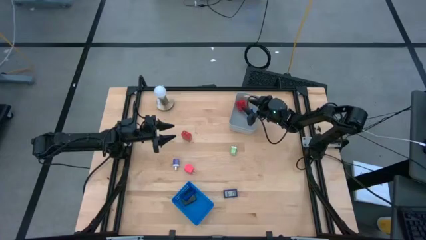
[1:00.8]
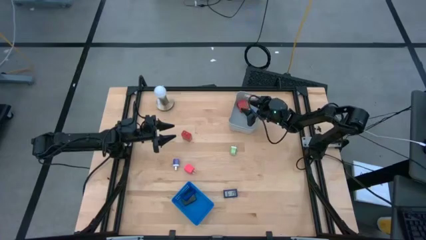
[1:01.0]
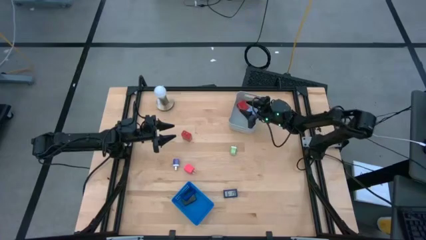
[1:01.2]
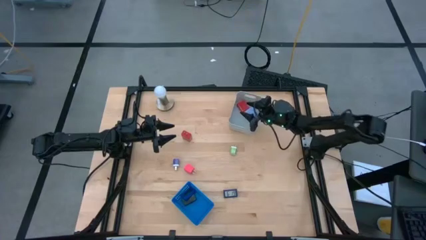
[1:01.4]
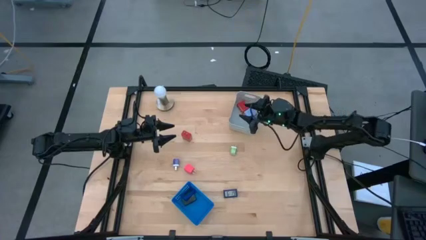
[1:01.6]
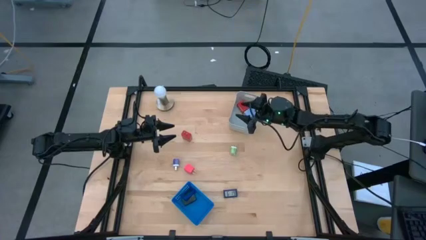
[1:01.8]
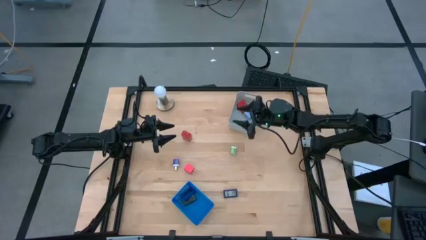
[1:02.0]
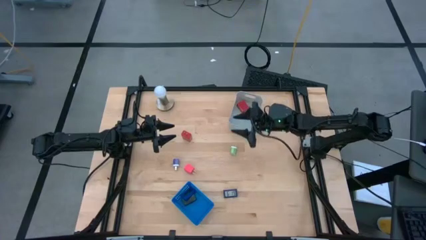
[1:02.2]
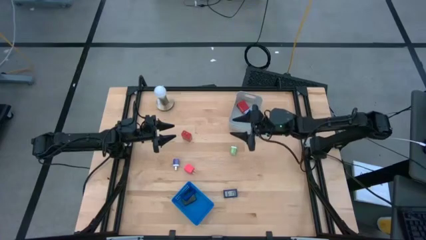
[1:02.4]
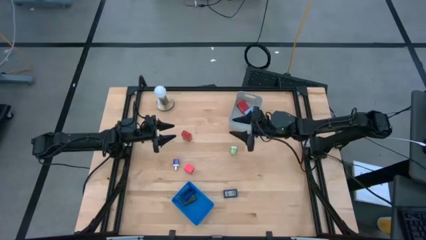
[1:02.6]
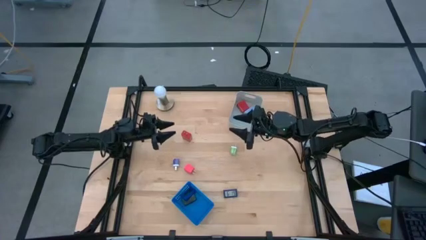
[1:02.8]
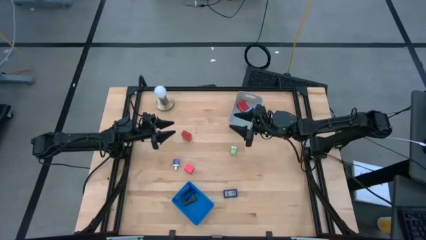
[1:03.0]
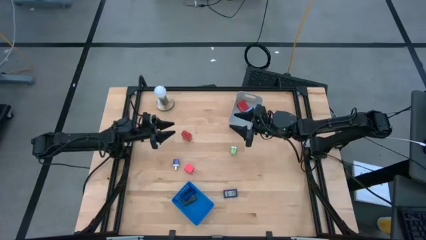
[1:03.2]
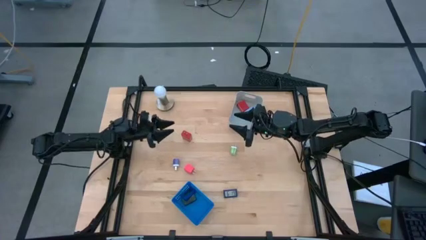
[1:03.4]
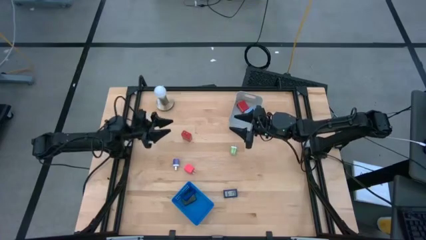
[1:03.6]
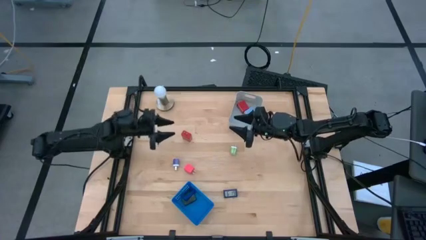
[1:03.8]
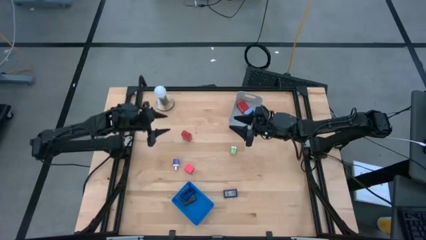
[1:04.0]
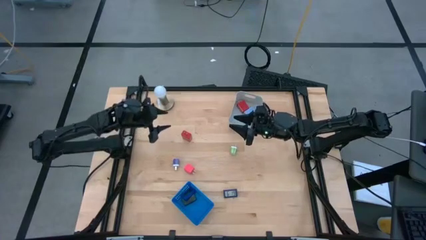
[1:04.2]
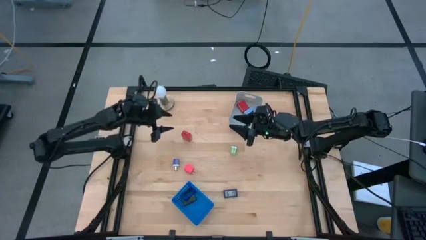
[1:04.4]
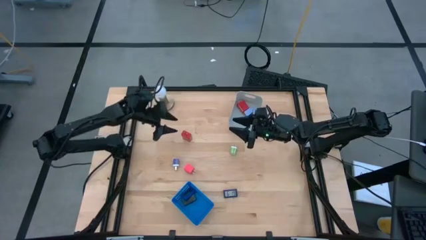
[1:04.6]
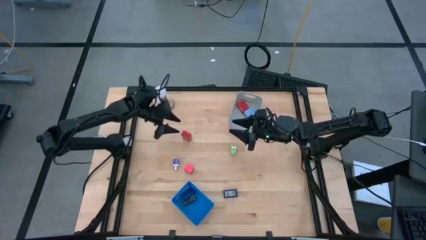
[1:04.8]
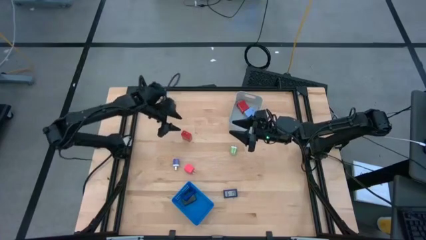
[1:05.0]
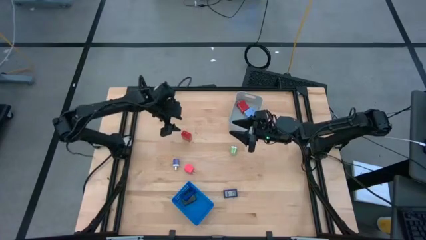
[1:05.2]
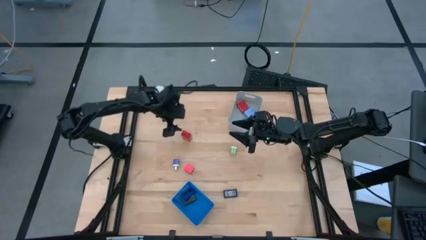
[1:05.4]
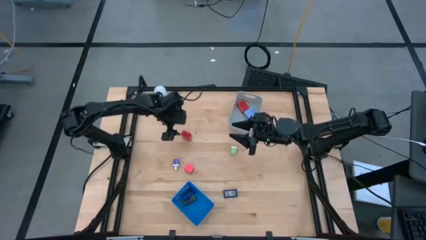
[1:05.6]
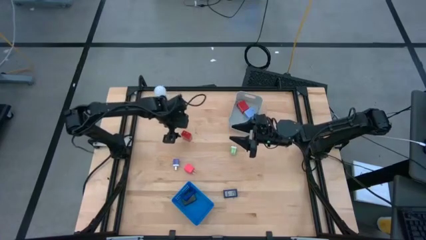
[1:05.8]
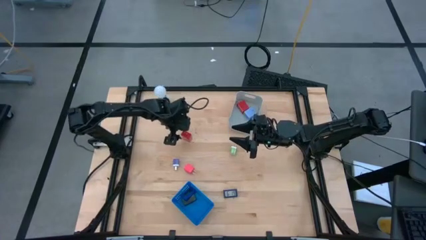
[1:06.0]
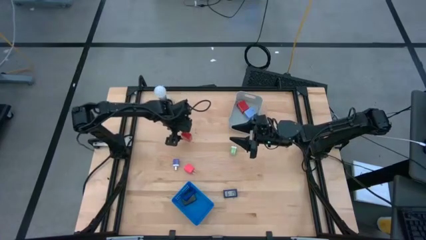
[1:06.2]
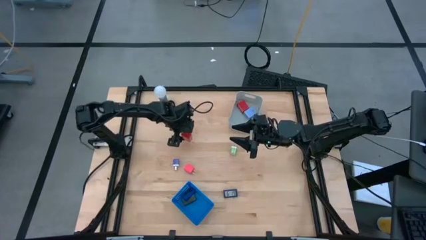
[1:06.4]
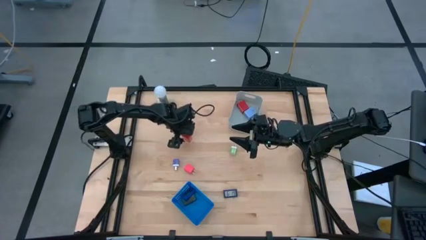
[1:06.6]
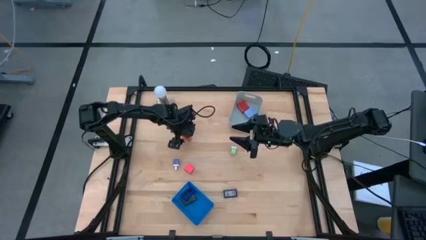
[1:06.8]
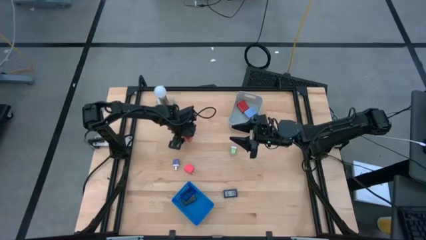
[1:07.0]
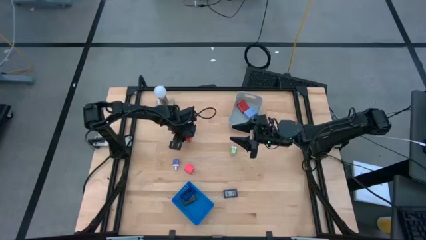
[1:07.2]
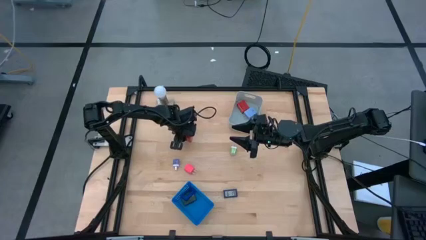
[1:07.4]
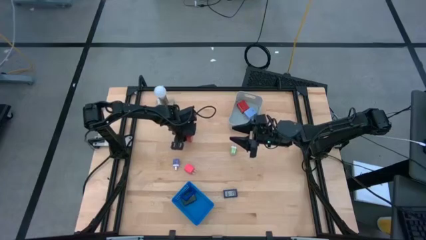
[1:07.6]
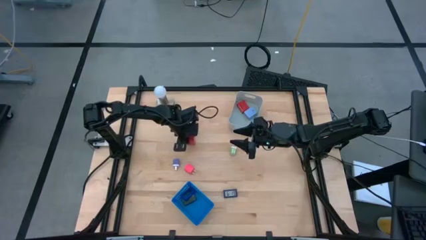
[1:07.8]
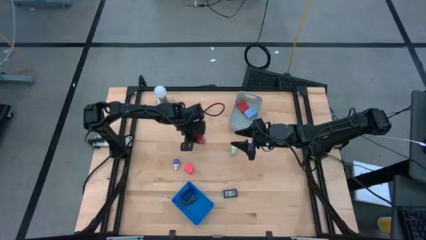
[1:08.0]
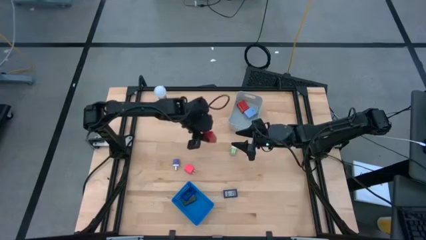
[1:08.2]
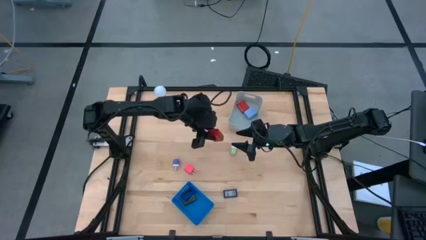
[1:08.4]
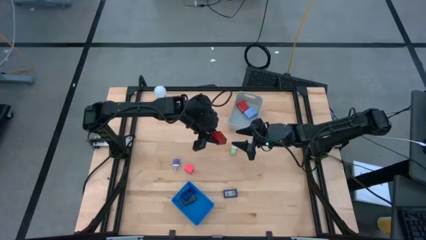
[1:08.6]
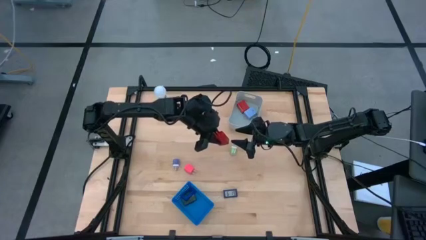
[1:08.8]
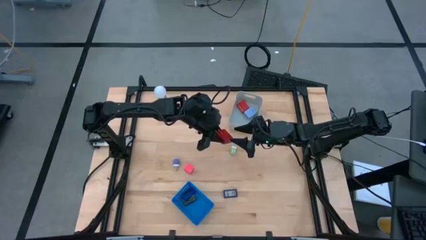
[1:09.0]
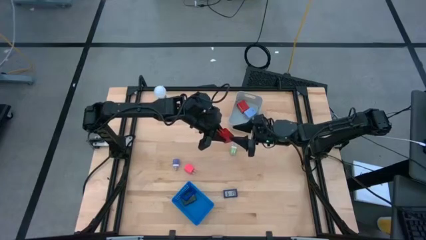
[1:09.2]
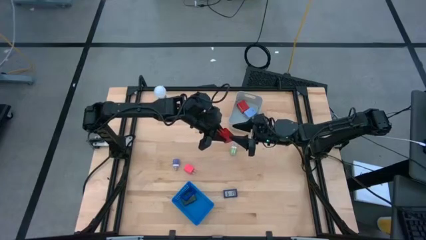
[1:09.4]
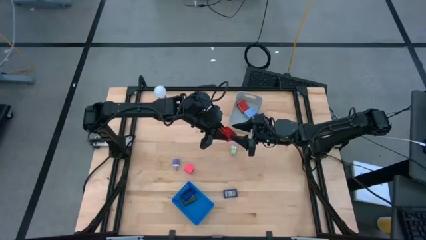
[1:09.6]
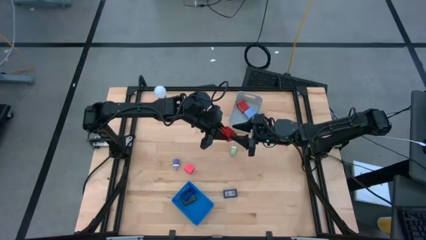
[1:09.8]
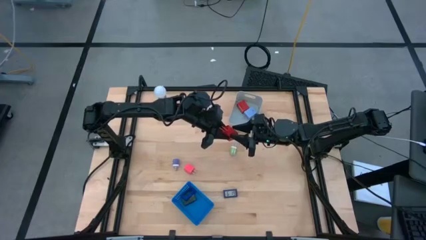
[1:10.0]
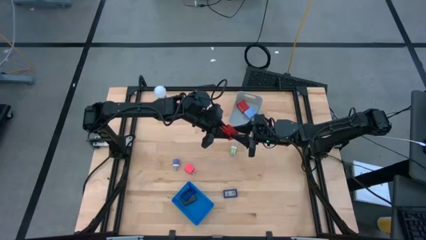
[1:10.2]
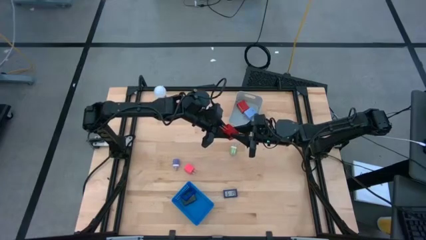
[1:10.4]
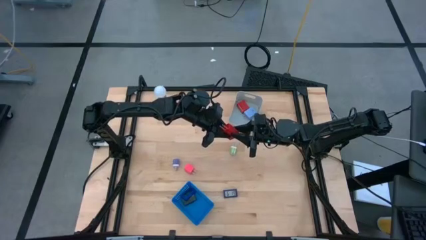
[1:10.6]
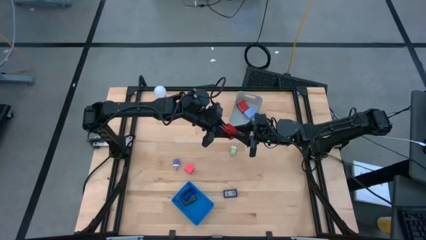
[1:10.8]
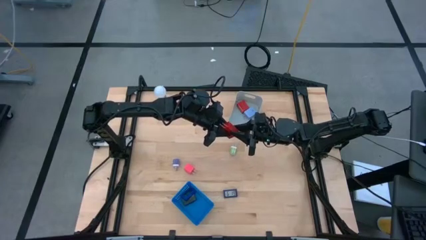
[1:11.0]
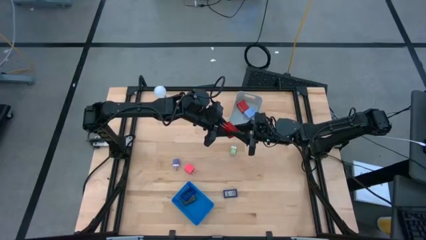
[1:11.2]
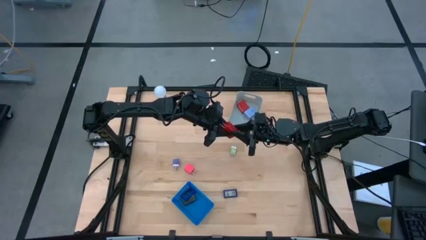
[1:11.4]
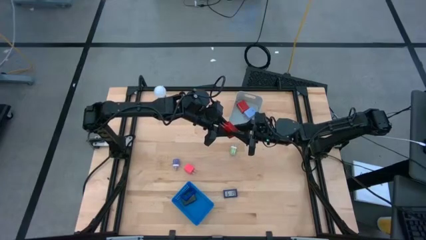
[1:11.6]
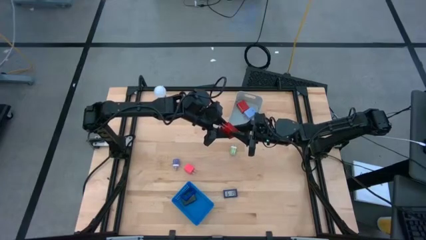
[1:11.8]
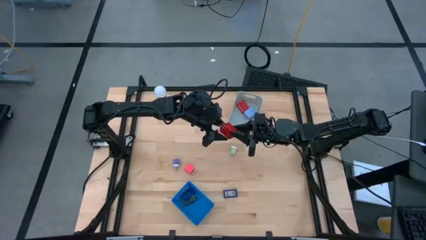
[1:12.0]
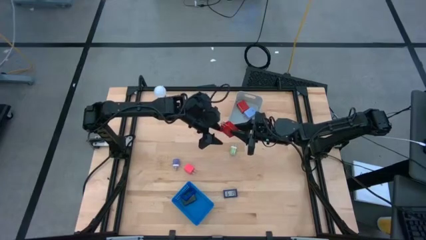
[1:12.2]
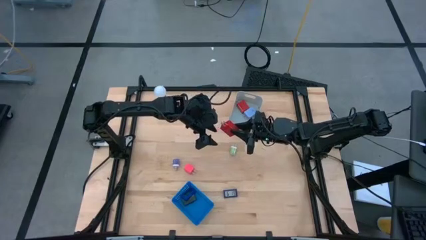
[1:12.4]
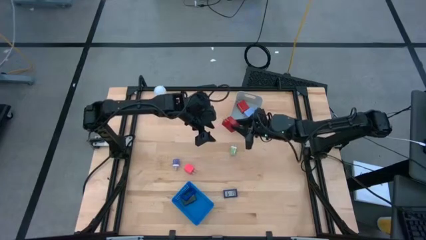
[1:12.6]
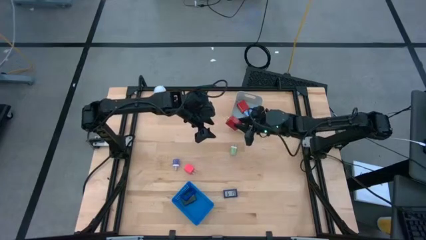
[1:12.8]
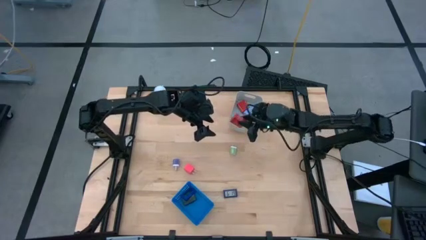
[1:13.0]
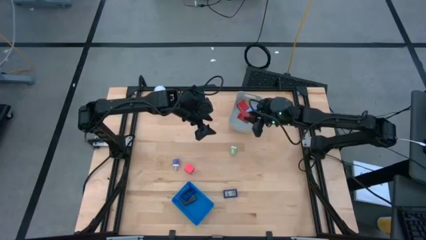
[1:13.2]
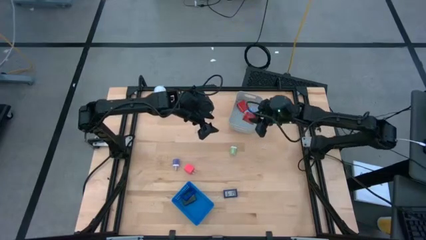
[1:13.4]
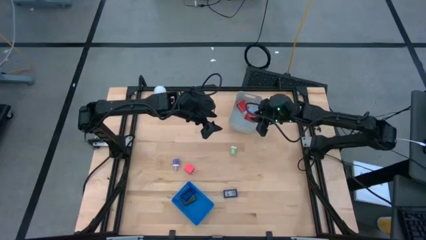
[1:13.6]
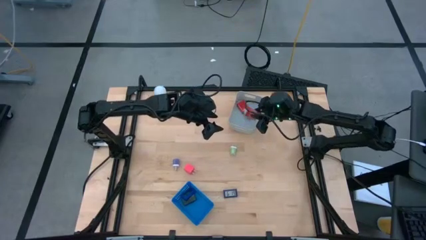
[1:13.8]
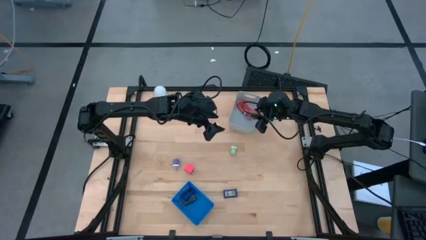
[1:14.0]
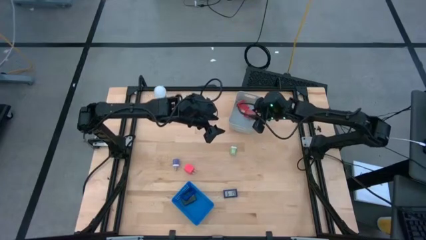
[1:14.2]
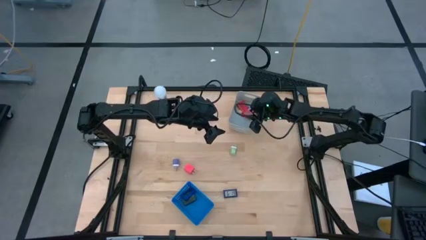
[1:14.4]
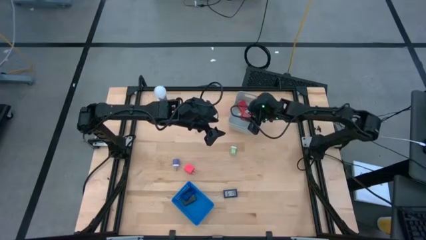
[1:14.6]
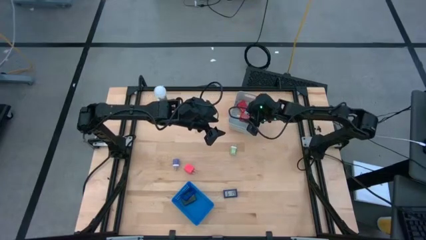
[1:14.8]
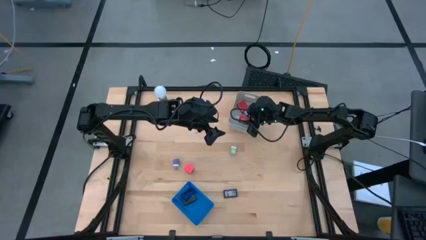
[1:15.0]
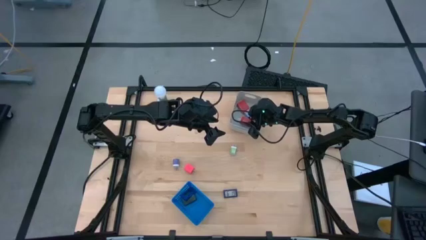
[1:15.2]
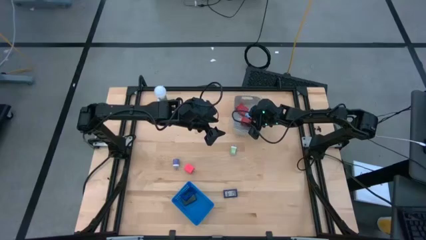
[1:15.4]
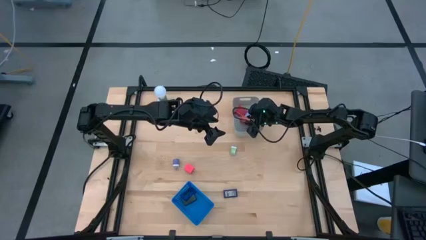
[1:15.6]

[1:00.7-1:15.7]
Task: Pick & Place Office items
Put the red charger adapter into the gray bin

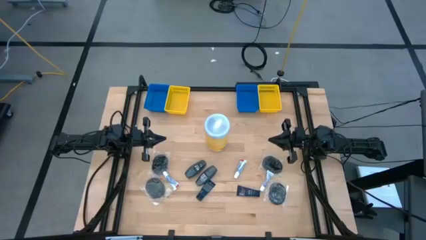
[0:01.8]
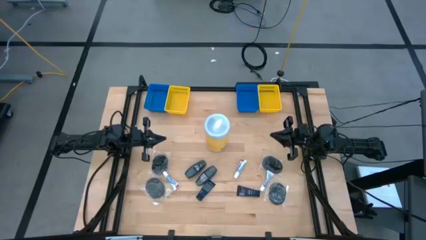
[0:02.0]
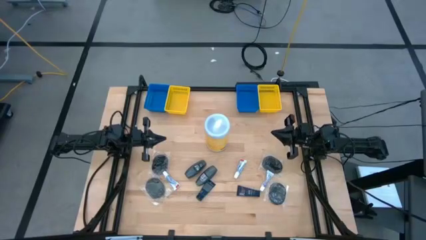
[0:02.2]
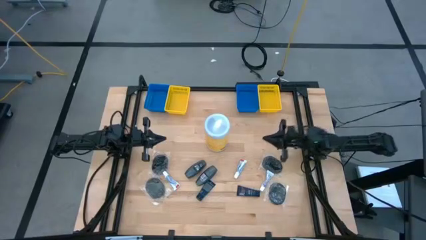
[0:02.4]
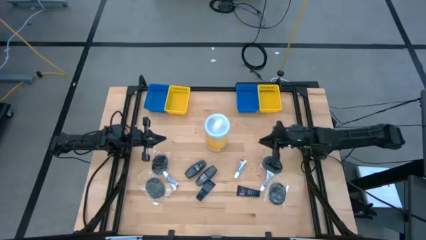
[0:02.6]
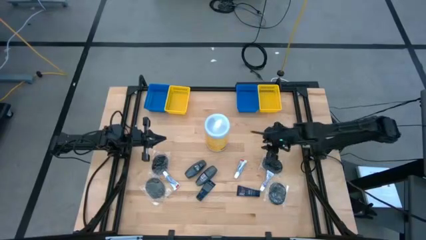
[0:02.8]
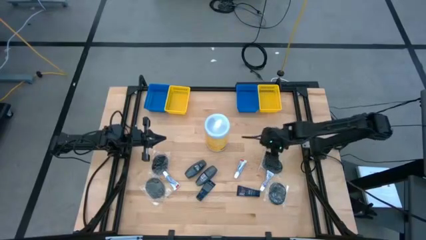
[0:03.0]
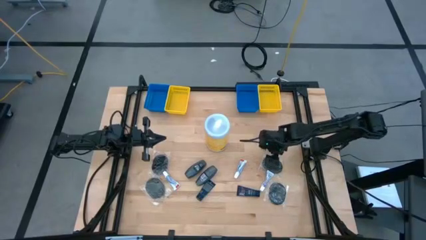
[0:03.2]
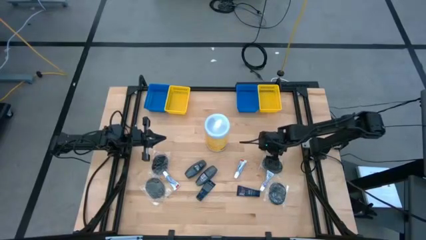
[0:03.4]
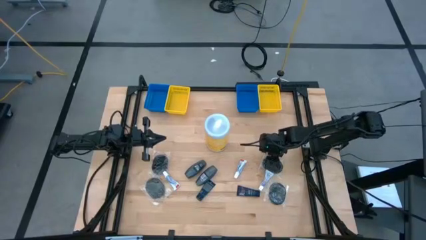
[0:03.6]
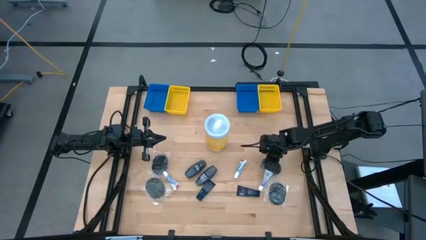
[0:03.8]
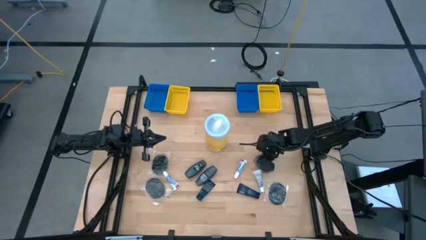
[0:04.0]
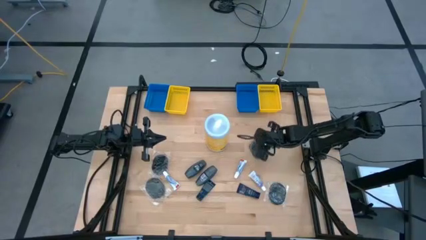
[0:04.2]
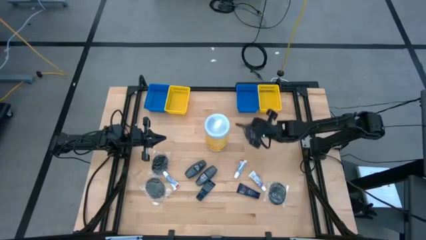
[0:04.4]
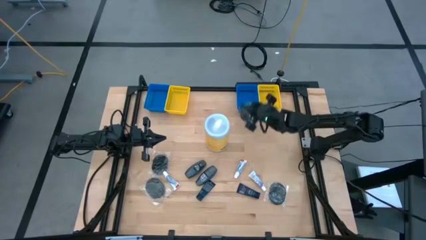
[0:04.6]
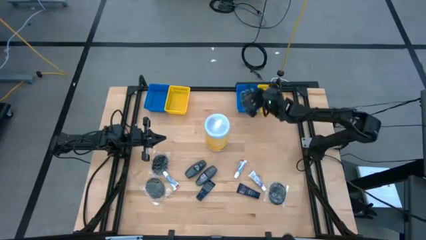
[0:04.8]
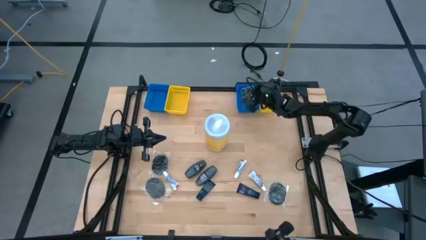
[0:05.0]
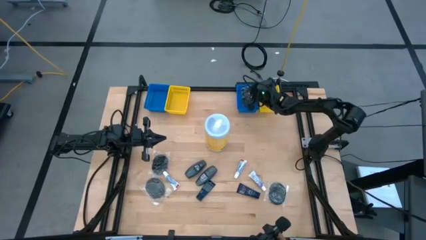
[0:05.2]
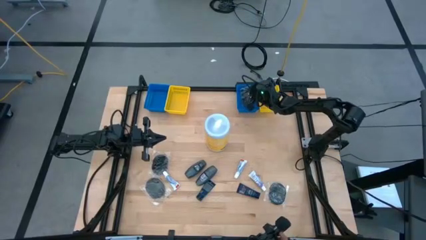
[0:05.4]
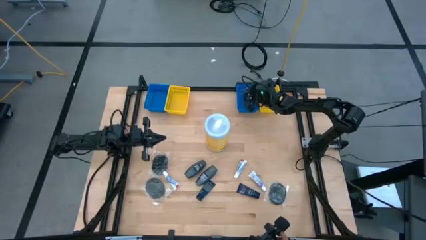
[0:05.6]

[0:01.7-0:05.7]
Task: Pick & Place Travel size toiletries
Put the top right hairbrush into the right blue bin
